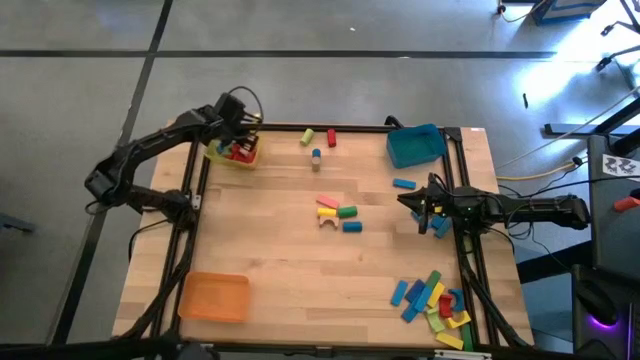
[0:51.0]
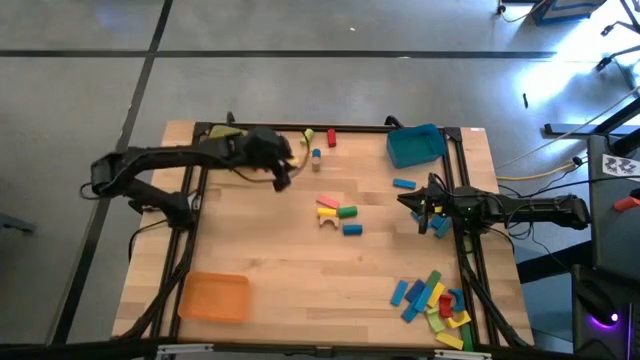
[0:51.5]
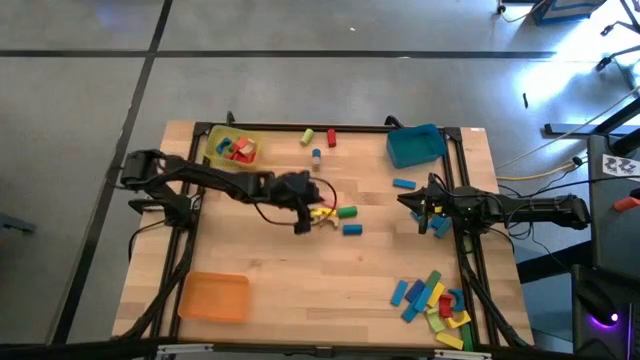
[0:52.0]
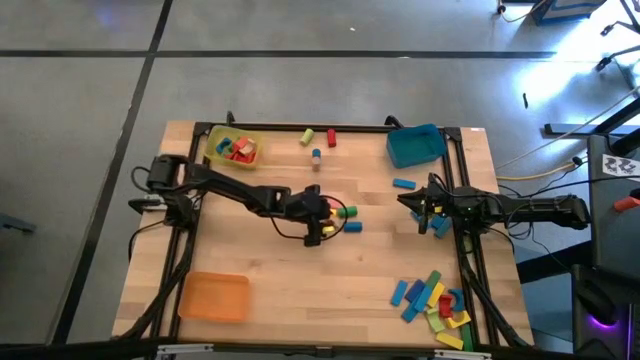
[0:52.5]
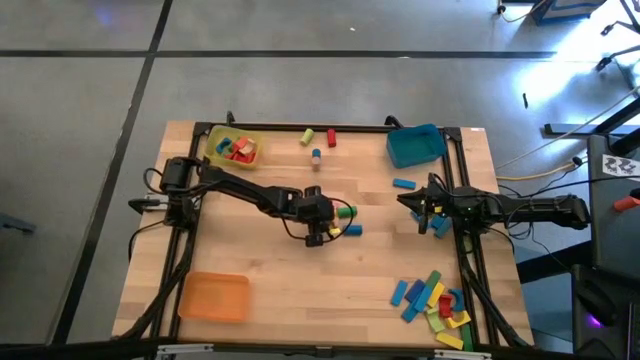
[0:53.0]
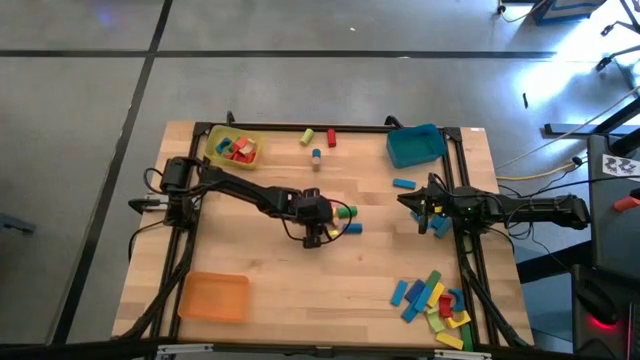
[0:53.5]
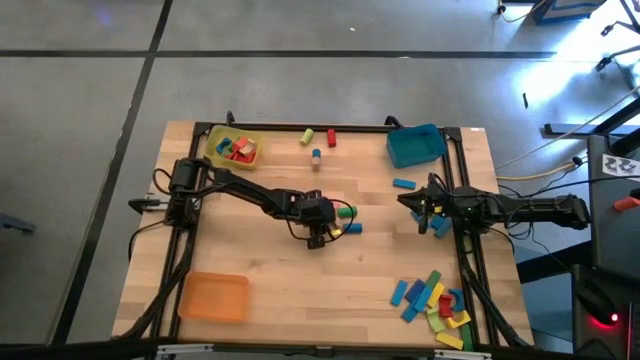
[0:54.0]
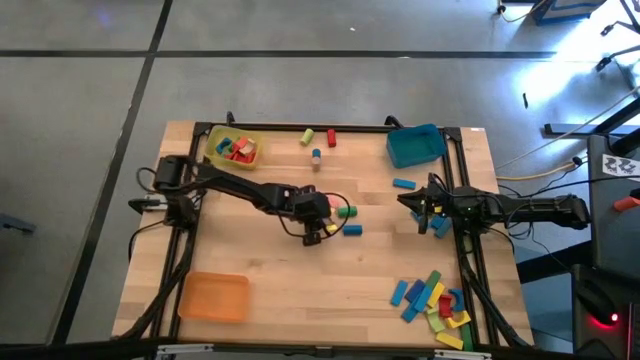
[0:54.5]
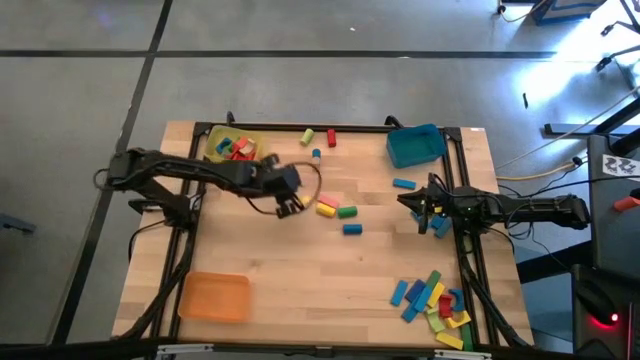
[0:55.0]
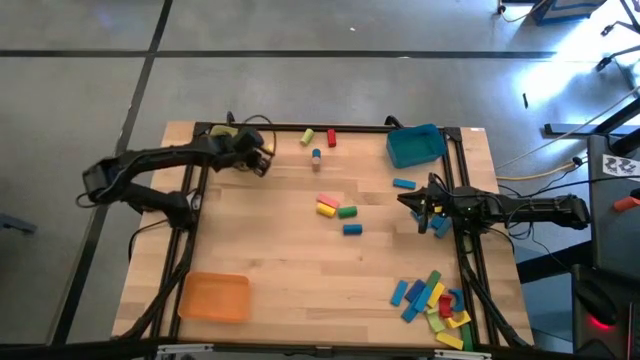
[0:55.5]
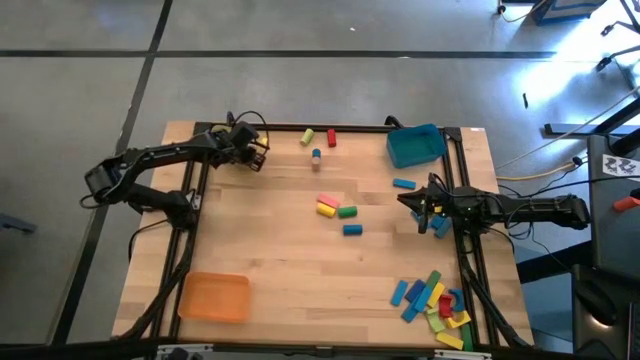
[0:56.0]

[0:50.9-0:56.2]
Task: Sort blocks by size
Put the brown arch block into the yellow bin

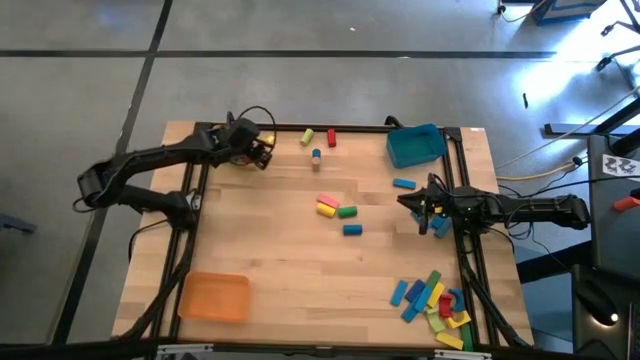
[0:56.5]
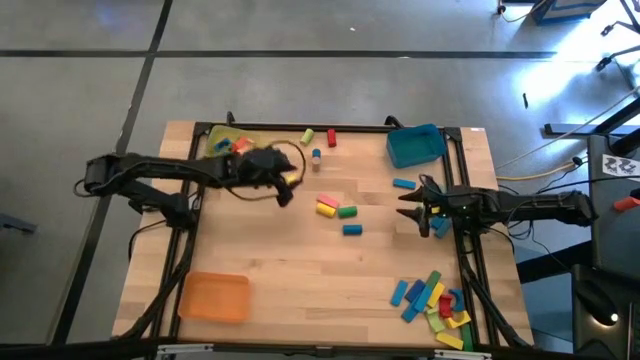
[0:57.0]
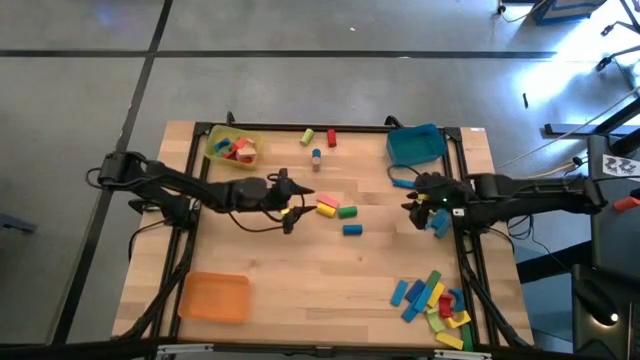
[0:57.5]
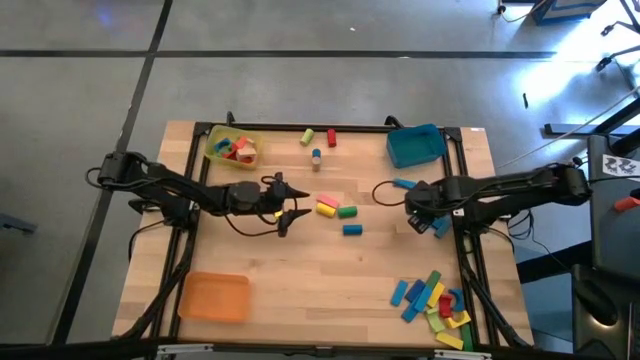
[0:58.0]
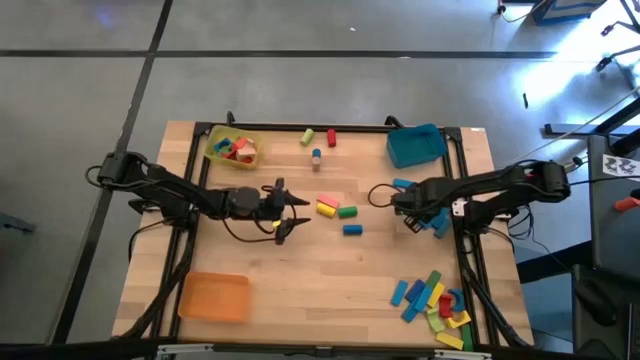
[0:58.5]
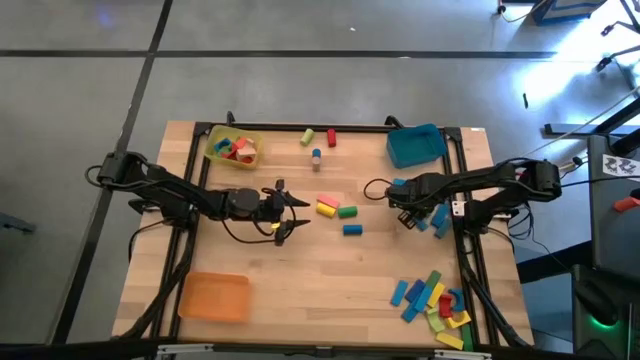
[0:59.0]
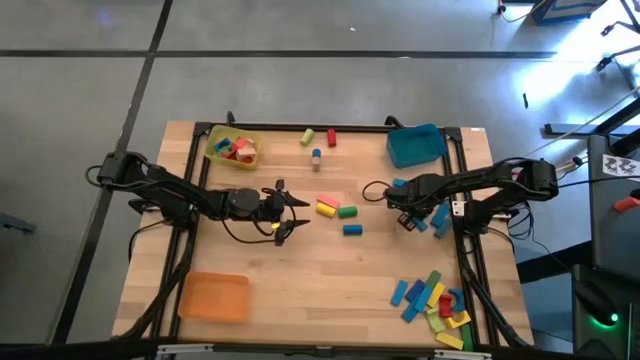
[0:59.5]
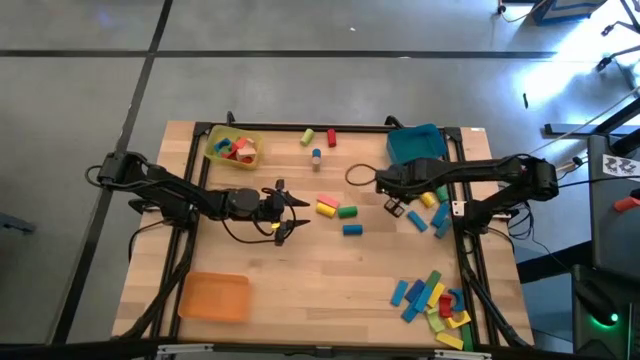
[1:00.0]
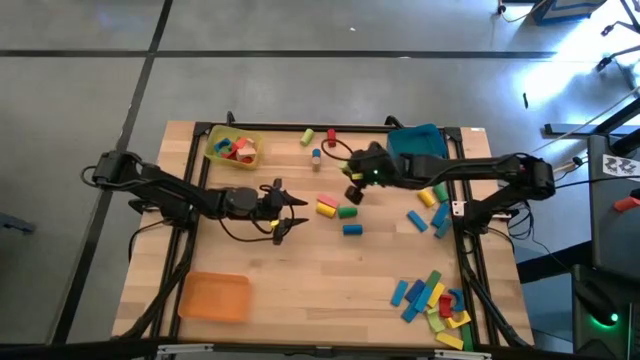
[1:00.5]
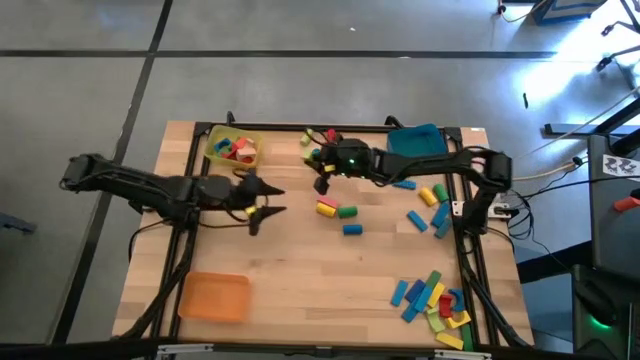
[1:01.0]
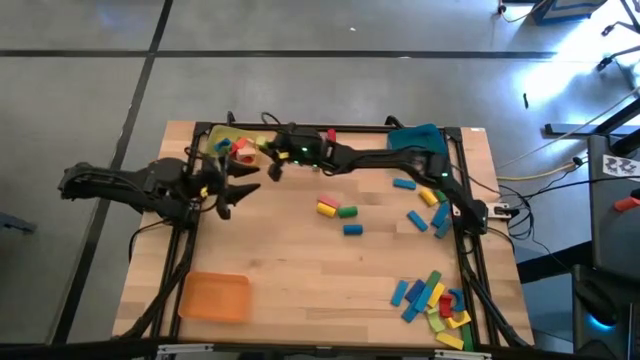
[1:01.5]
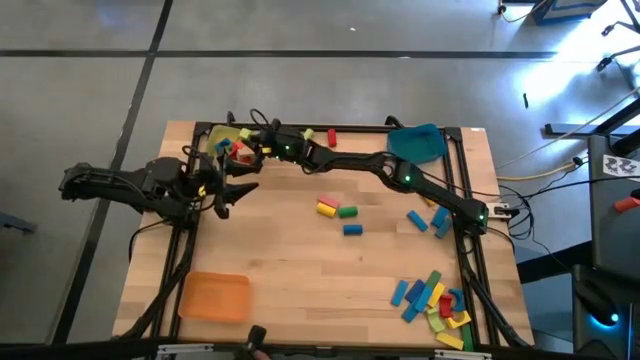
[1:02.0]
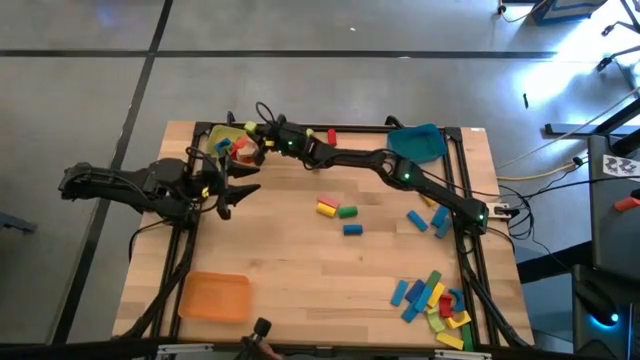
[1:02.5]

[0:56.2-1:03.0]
Put the light green arch block into the yellow bin

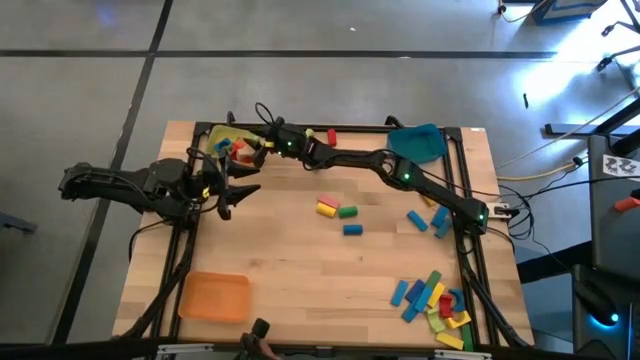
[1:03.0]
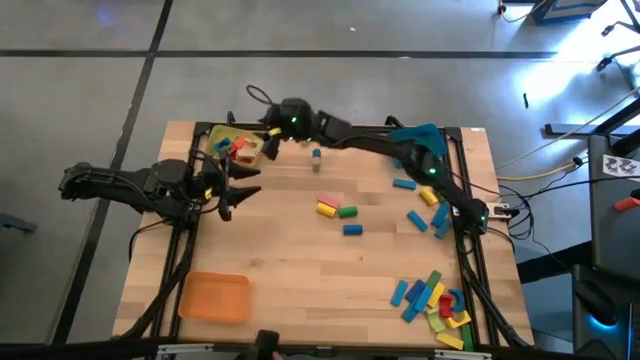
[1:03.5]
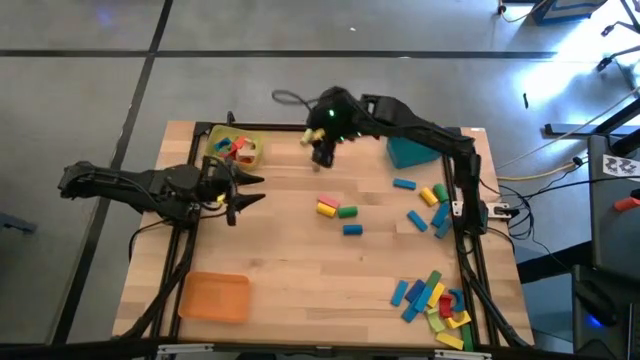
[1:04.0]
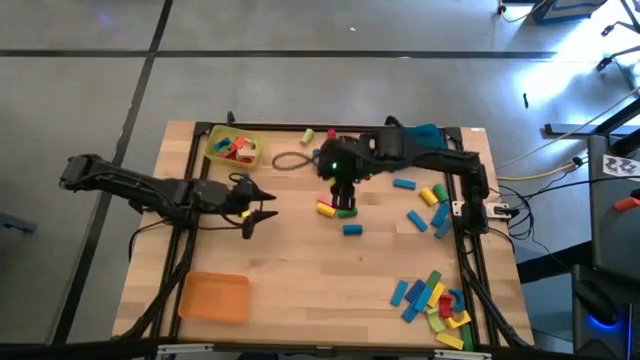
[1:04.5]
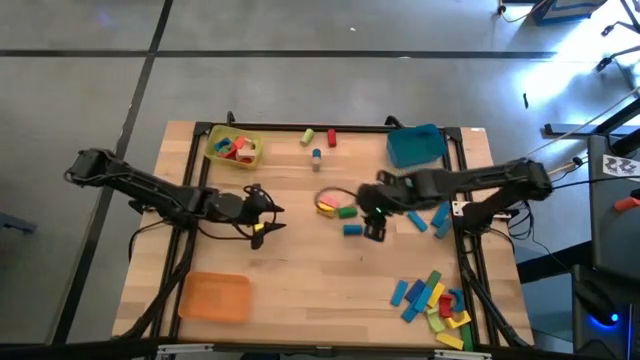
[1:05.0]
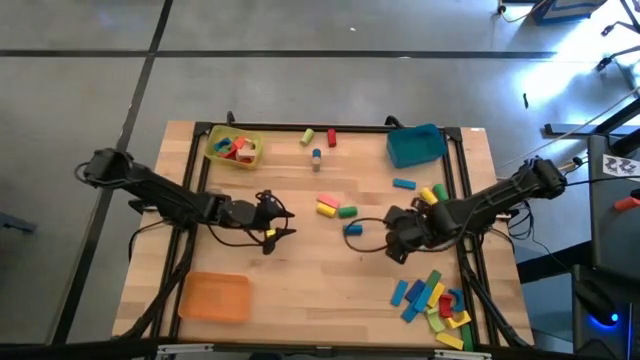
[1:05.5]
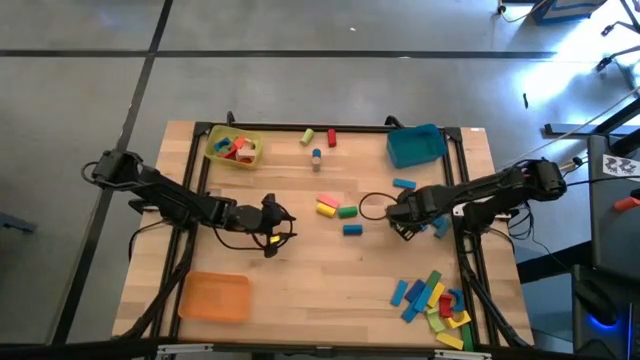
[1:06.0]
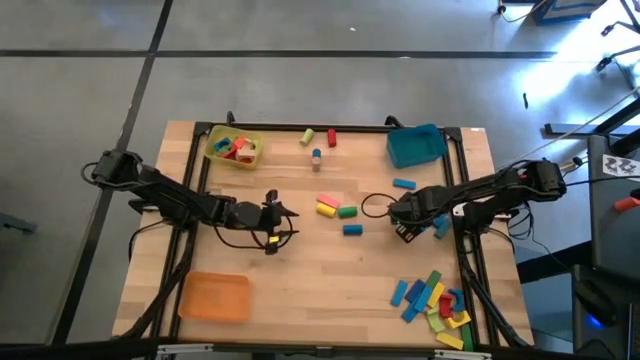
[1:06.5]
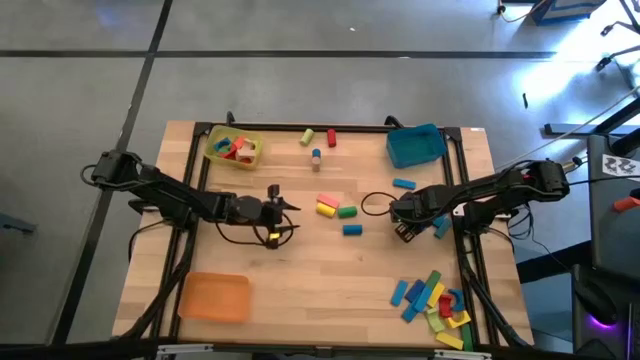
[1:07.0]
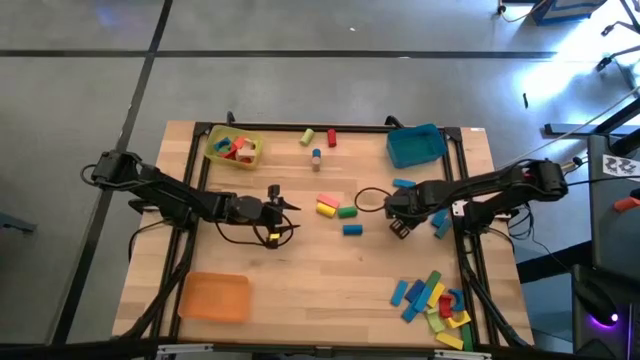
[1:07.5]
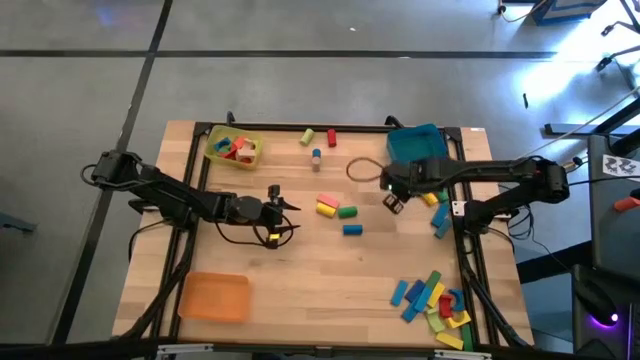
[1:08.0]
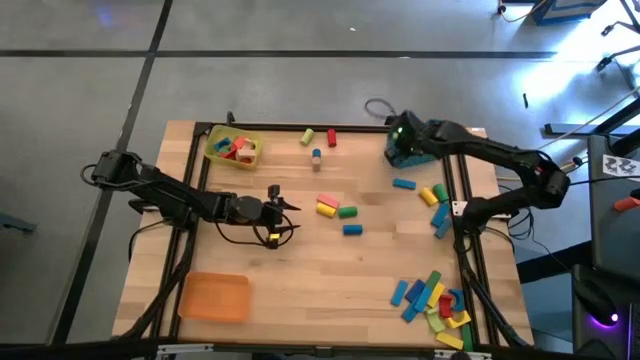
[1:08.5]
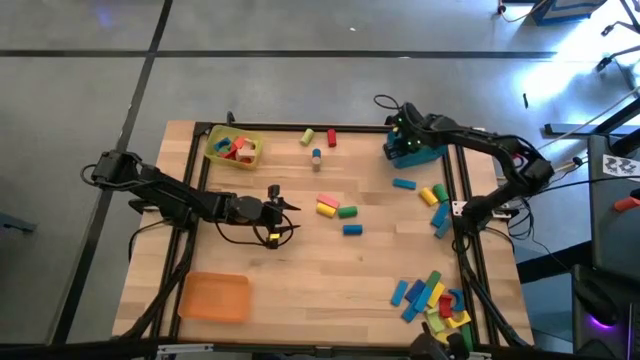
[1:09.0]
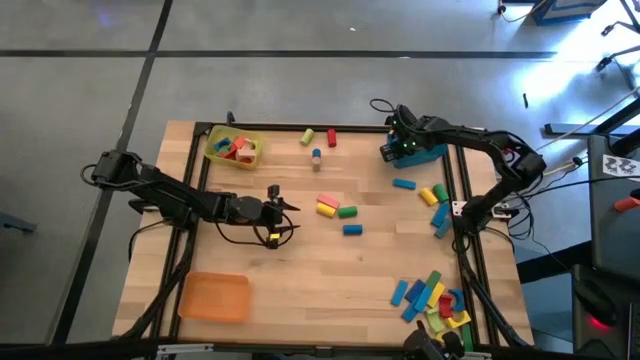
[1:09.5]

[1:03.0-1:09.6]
Put the blue rectangular block into the blue bin

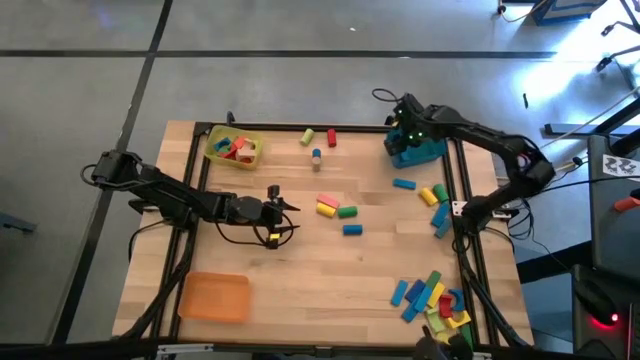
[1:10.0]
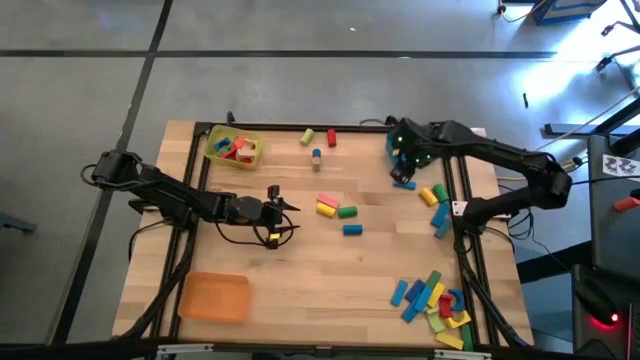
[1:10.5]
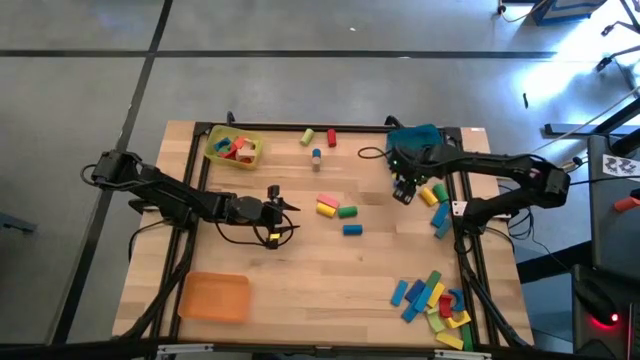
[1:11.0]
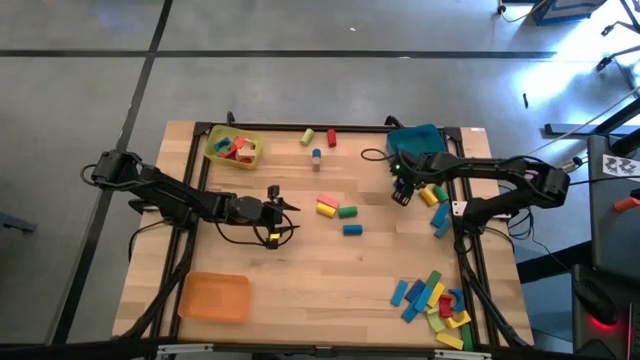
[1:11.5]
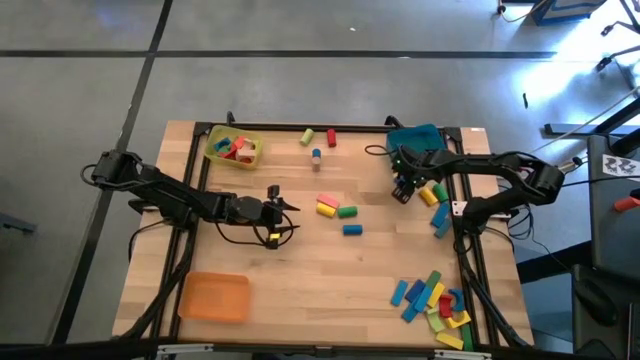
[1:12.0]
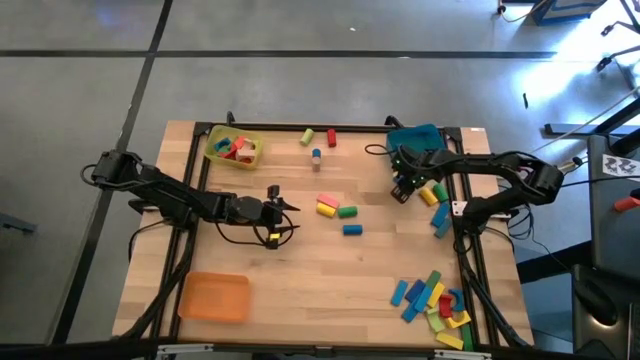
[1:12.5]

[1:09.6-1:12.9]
Put the blue rectangular block into the blue bin
